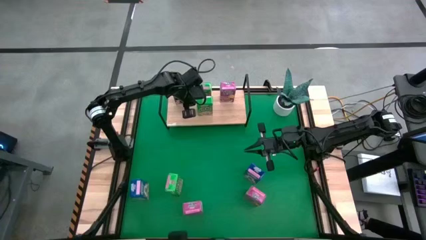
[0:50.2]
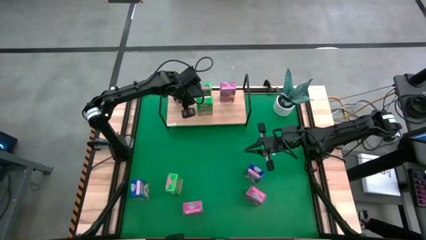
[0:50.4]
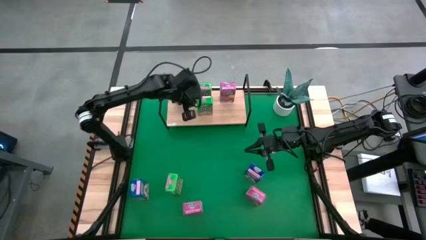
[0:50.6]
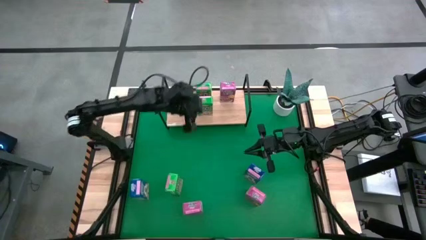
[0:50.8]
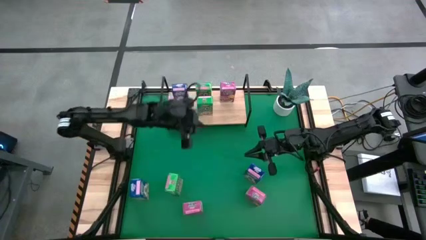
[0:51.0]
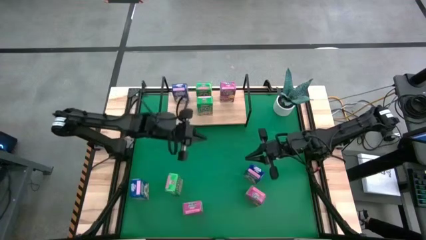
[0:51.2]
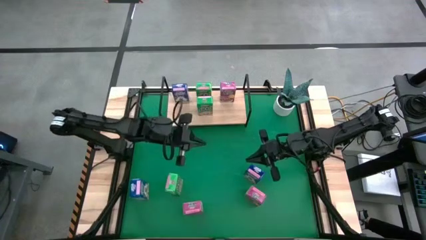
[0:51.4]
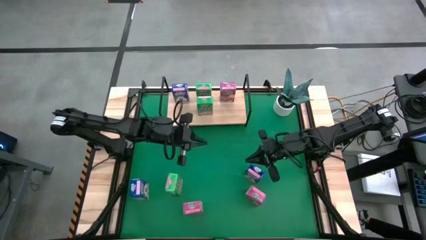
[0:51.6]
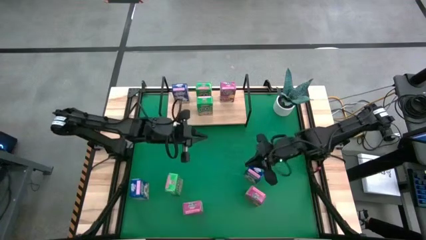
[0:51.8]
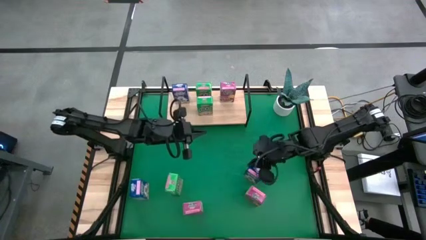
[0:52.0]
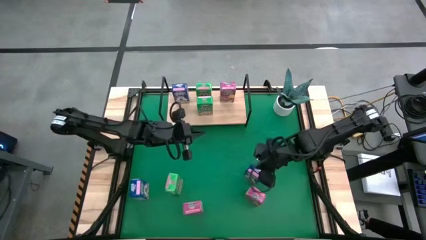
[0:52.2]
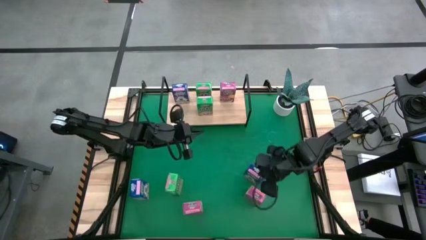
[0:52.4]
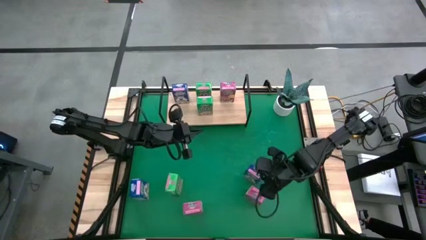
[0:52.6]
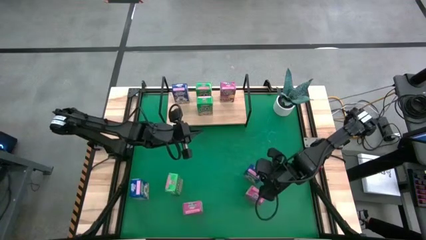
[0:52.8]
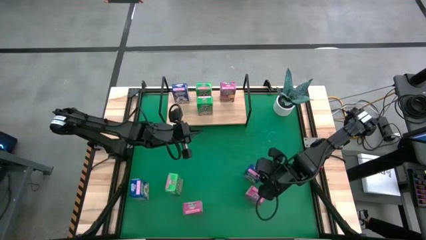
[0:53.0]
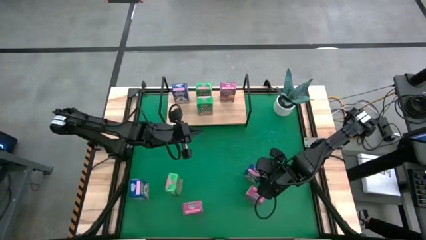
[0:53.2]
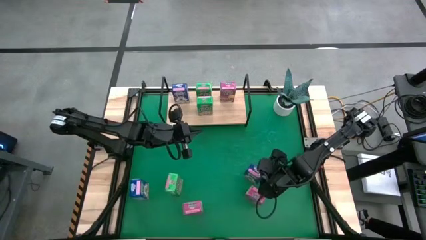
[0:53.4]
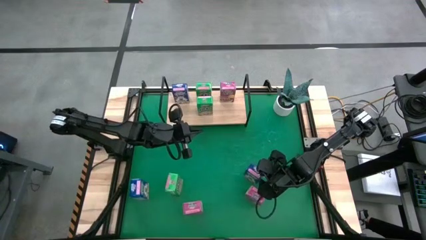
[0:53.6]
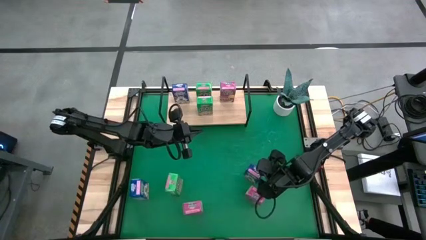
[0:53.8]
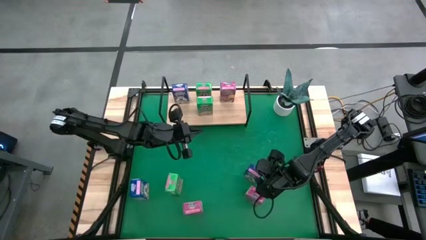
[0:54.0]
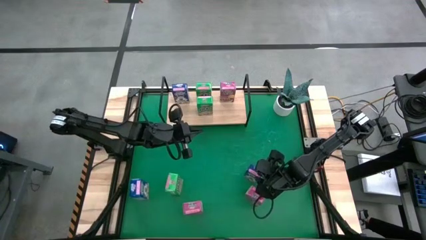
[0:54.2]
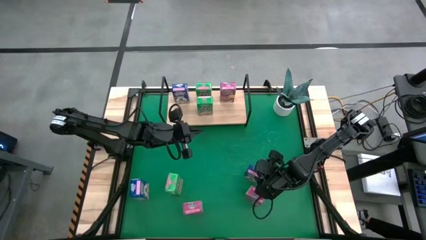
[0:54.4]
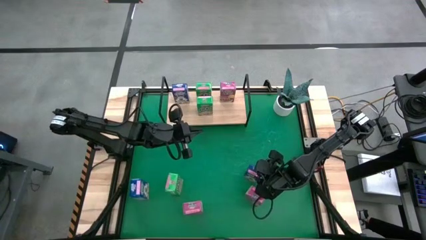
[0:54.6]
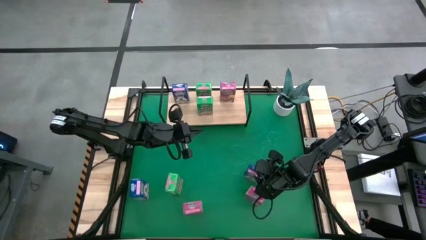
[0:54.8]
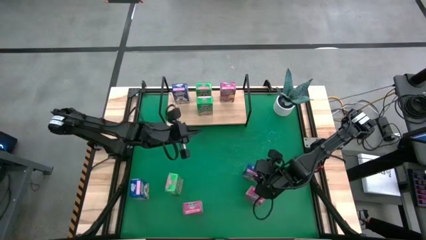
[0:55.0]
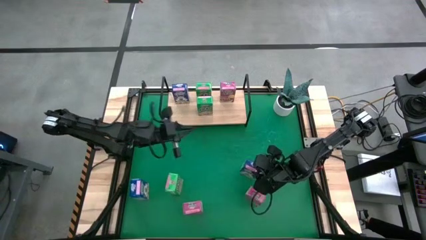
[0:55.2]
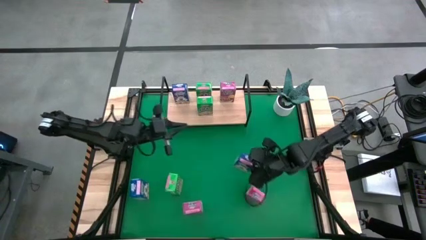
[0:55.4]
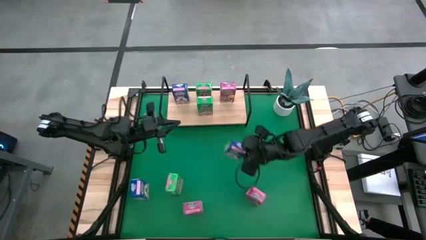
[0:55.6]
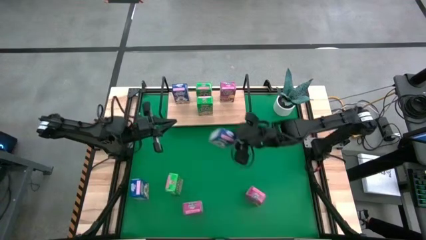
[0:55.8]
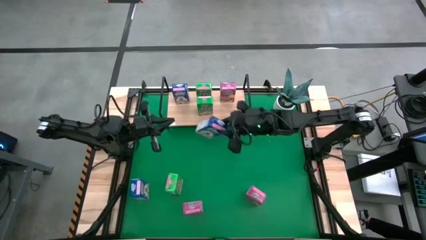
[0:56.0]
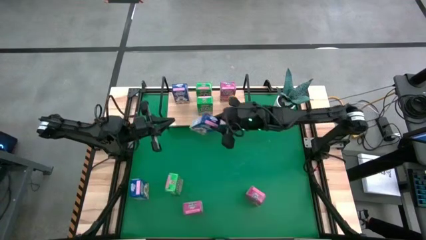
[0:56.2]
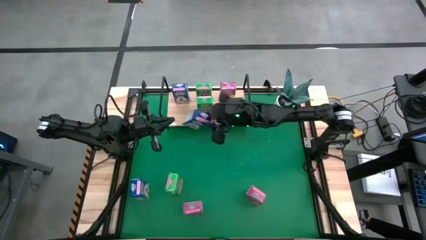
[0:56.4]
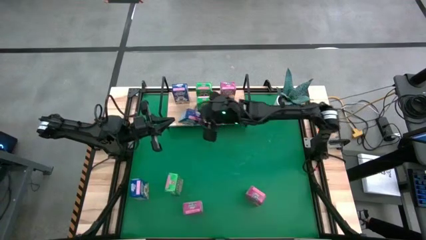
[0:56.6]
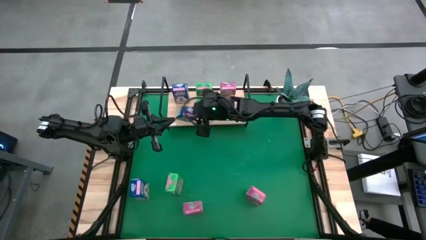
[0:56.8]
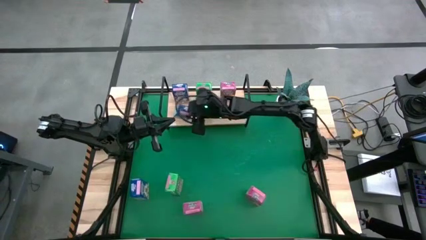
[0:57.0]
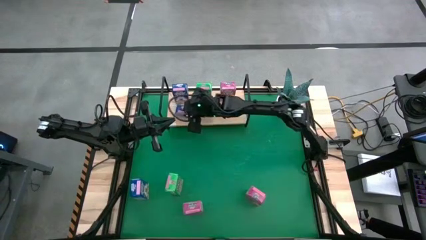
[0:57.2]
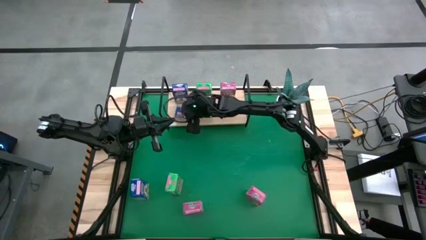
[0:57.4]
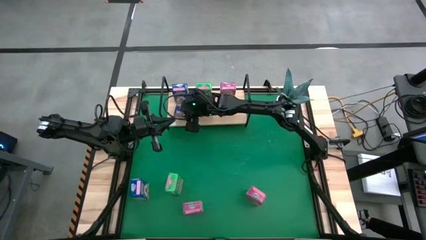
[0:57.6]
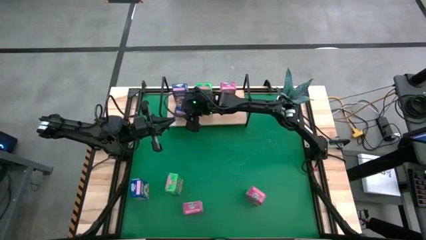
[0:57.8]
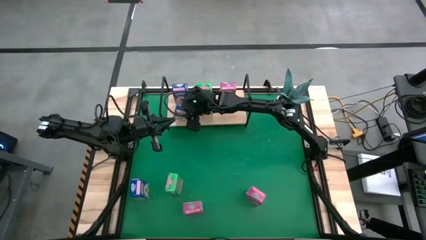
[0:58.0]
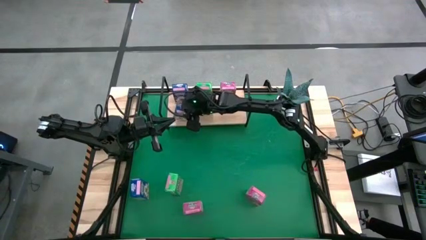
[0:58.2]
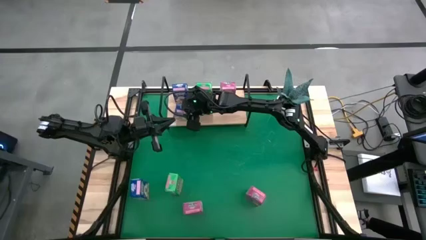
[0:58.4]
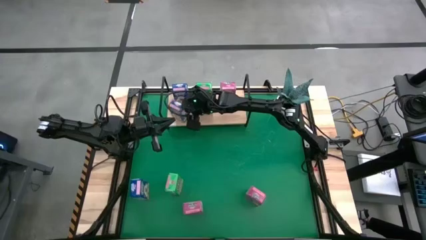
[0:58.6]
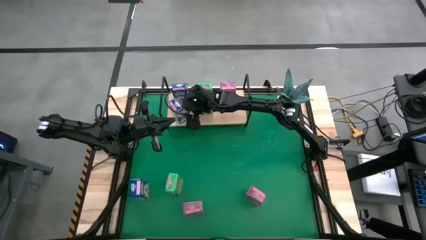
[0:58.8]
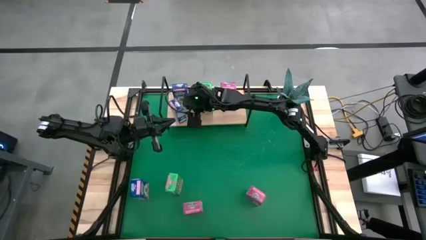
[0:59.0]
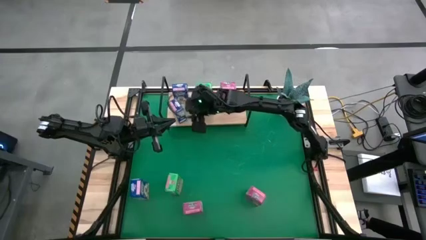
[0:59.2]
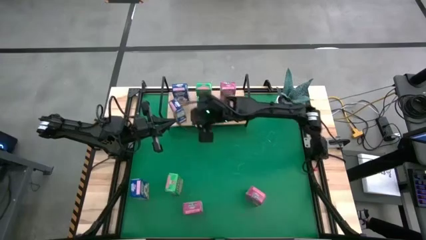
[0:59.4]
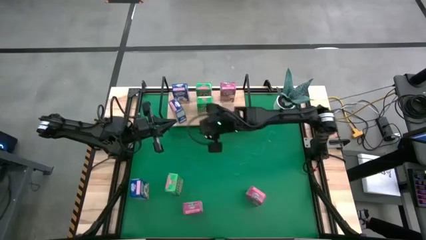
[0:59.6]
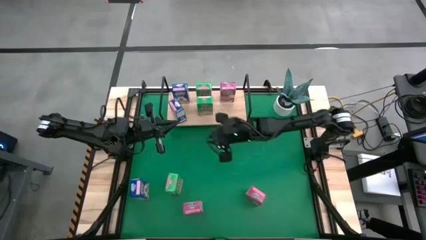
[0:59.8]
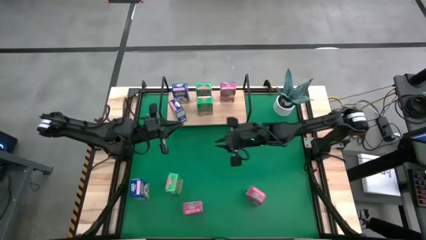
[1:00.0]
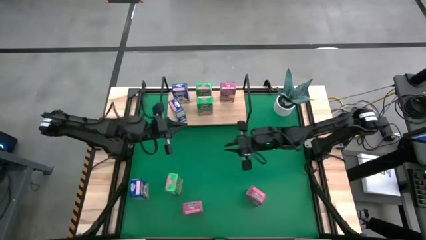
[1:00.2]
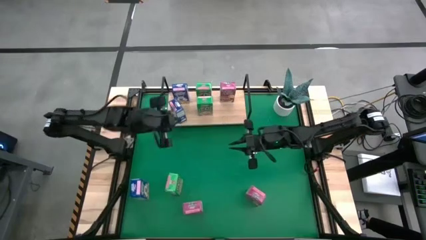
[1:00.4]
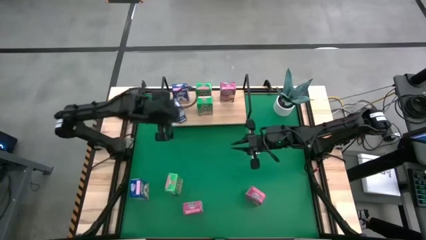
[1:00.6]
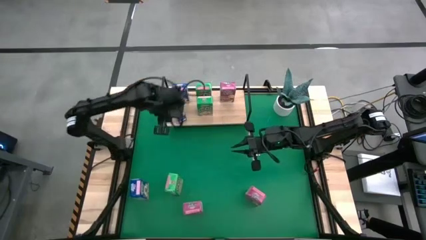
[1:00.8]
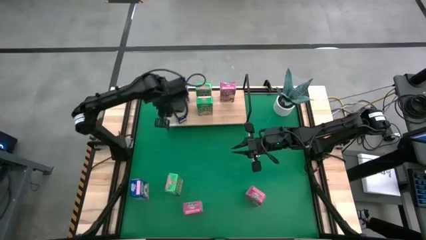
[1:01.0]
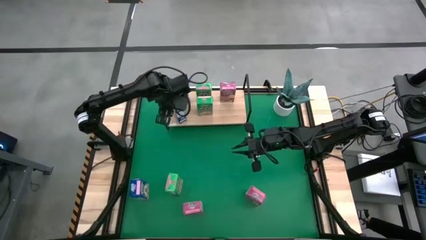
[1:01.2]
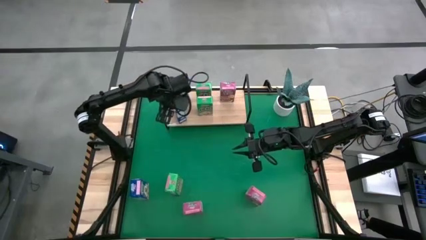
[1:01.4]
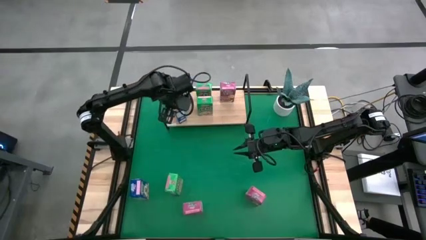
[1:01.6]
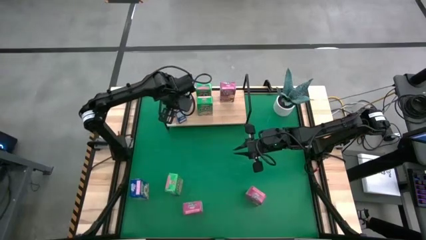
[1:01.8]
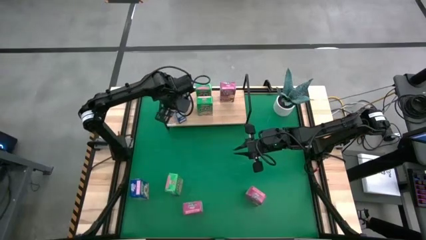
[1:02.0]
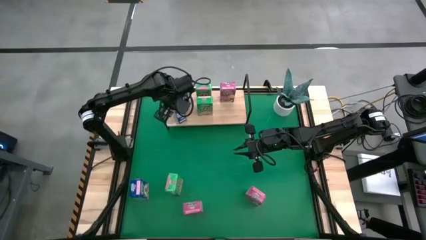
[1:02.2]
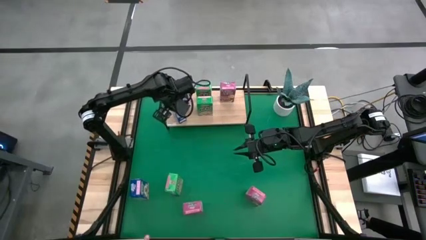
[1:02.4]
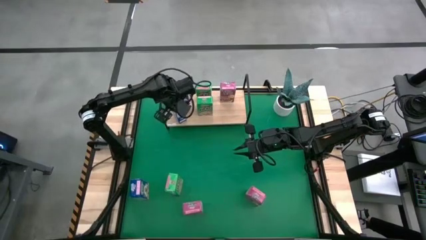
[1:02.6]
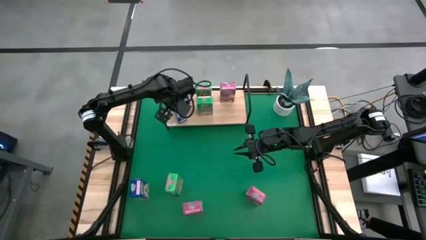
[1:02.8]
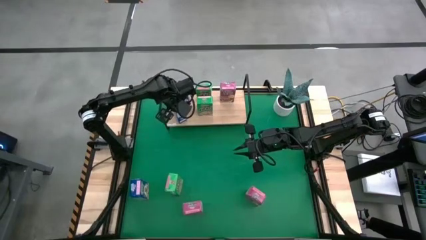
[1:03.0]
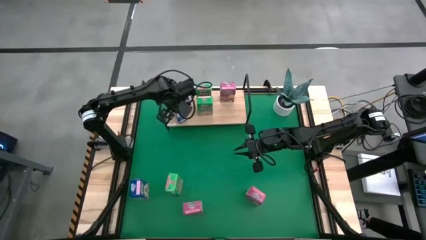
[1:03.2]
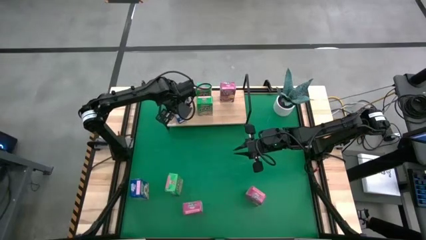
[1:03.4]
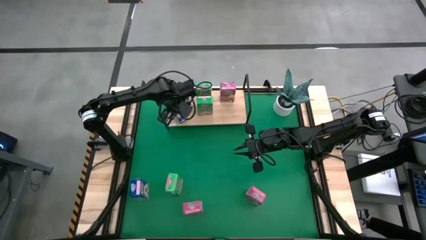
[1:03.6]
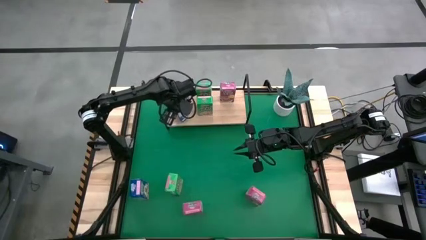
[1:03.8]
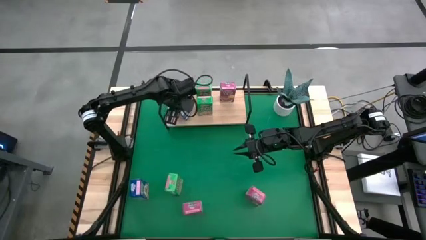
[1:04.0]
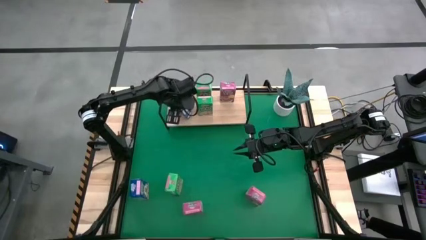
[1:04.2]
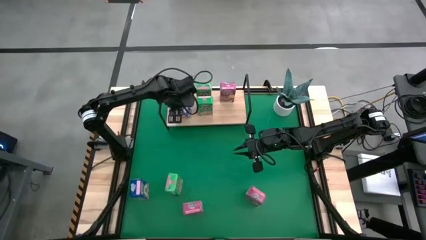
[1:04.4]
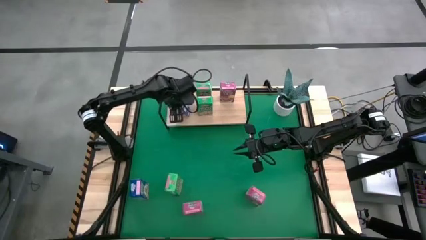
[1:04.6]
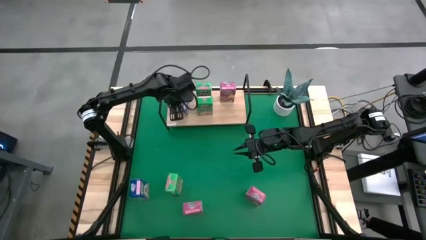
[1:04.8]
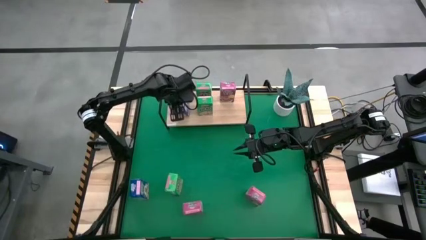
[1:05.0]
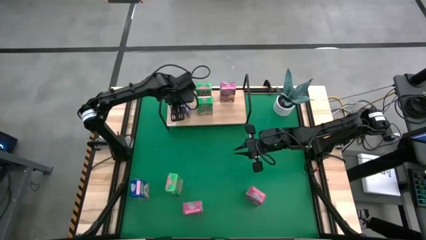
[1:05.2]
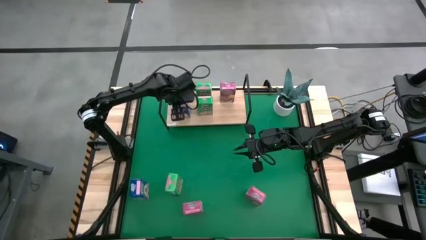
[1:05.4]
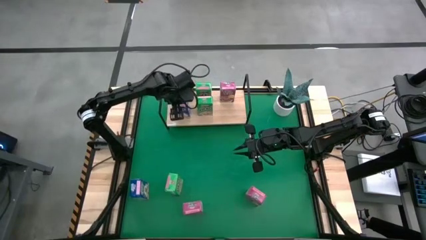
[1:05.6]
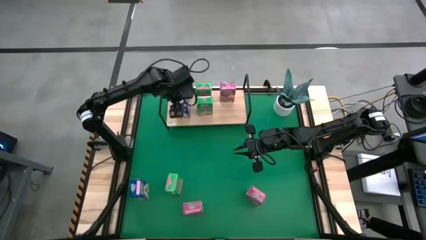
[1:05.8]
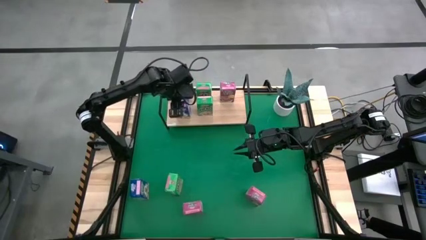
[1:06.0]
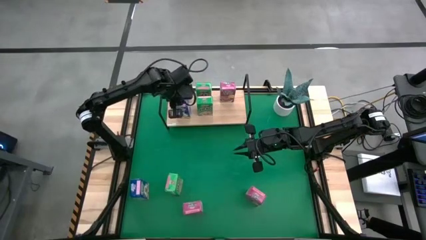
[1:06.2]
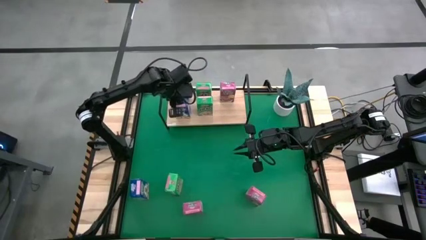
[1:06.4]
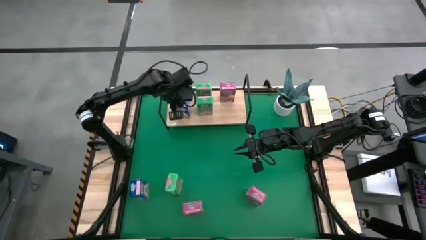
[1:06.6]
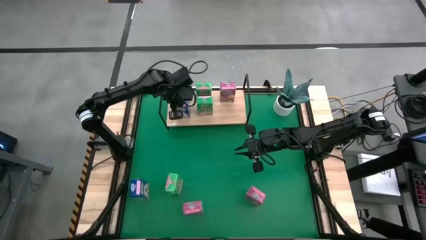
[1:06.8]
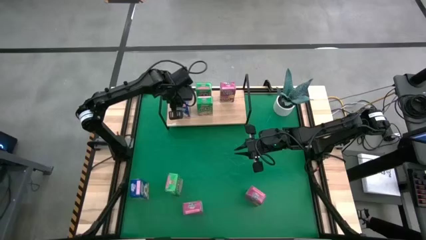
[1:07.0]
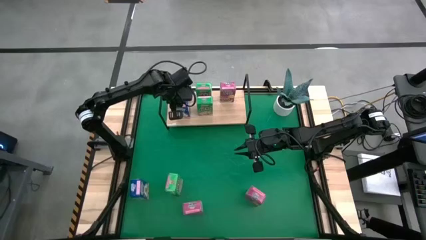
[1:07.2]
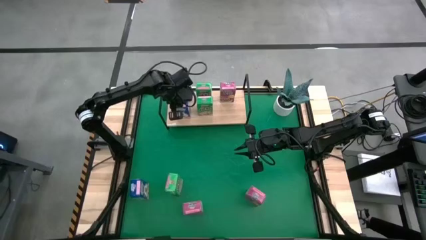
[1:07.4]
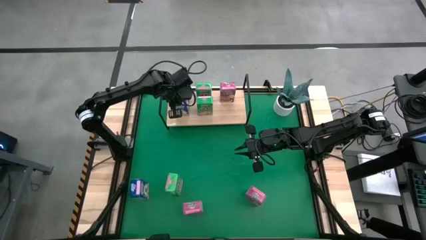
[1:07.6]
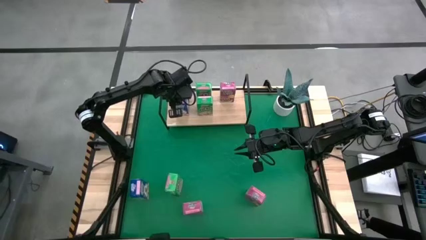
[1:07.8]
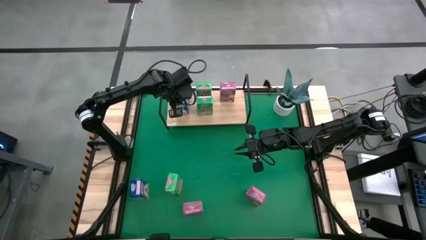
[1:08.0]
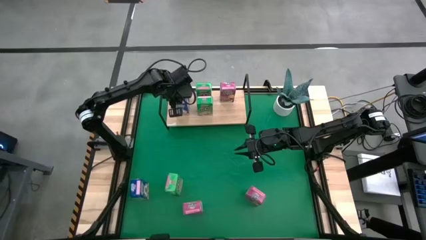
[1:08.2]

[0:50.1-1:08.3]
Task: Stack cereal on shelf
Put the right blue cereal box aligned with the other blue cereal box on the shelf
